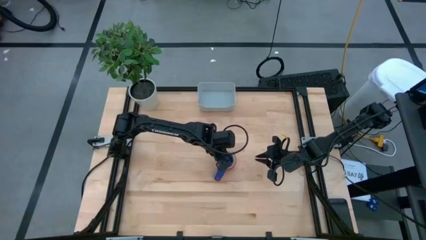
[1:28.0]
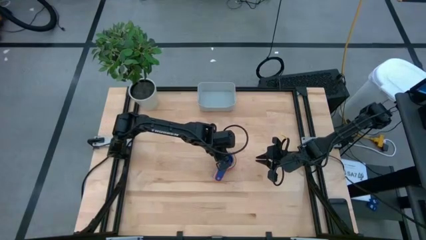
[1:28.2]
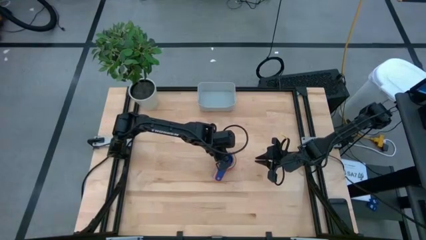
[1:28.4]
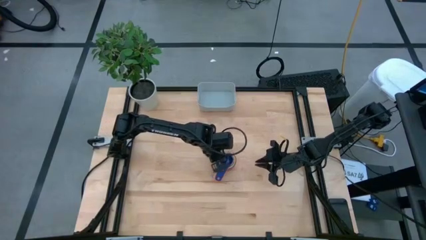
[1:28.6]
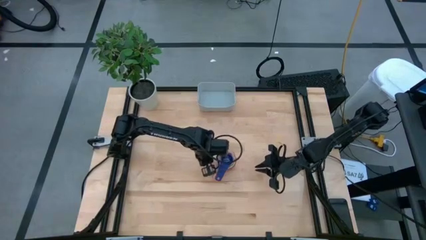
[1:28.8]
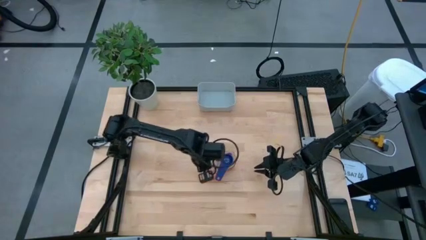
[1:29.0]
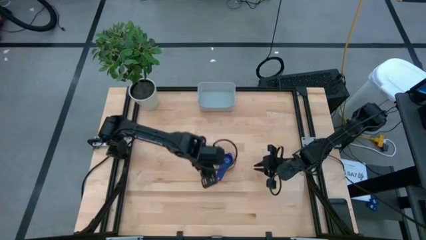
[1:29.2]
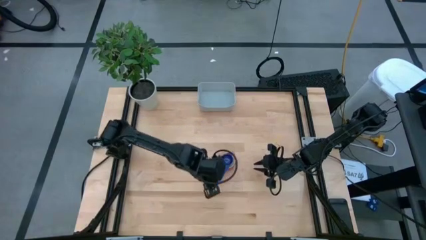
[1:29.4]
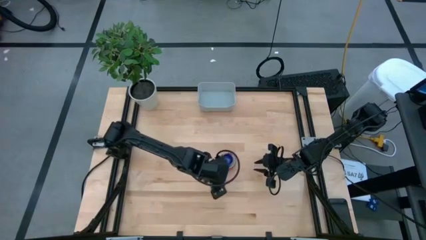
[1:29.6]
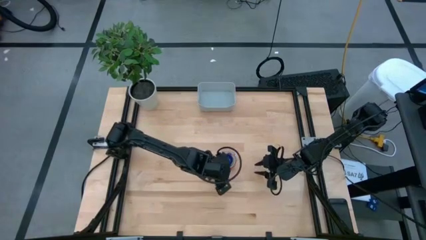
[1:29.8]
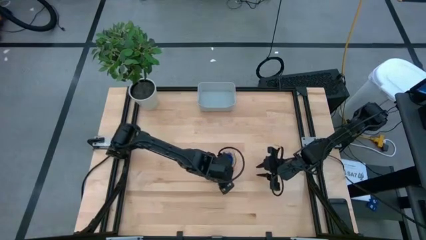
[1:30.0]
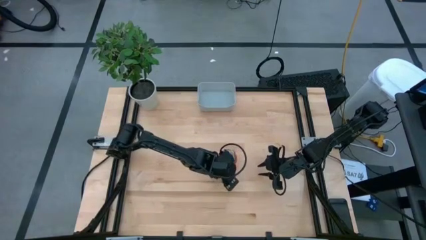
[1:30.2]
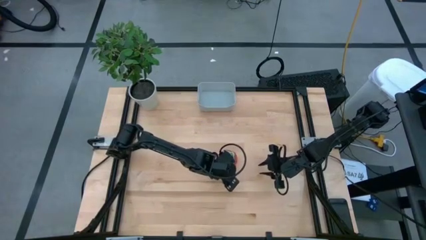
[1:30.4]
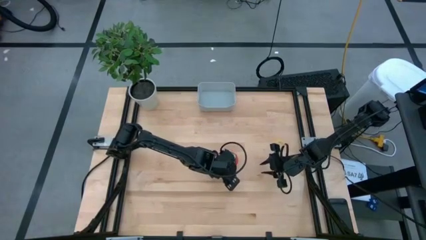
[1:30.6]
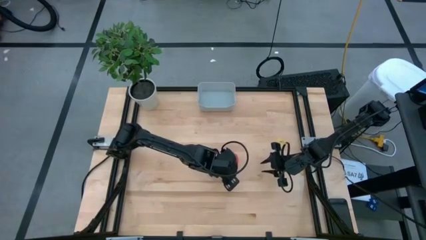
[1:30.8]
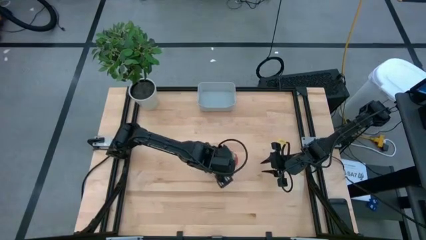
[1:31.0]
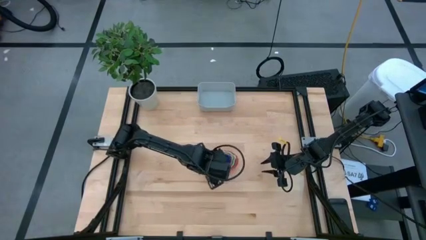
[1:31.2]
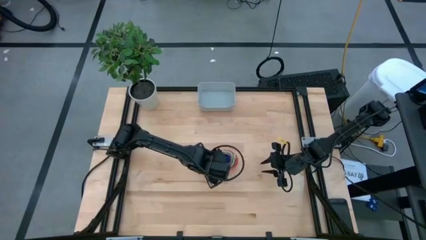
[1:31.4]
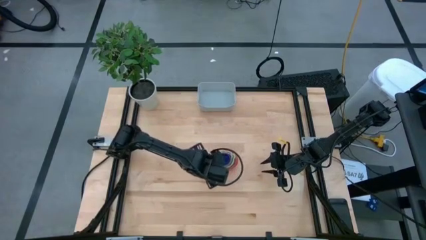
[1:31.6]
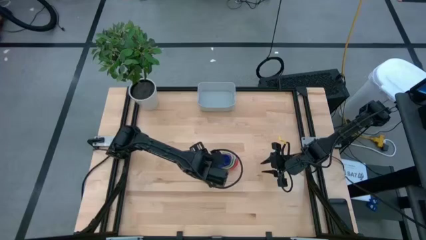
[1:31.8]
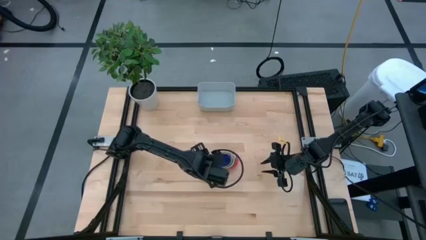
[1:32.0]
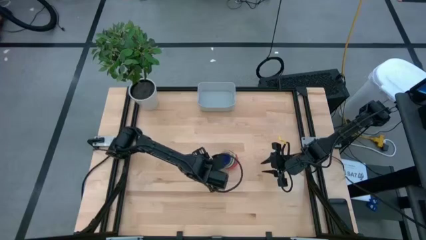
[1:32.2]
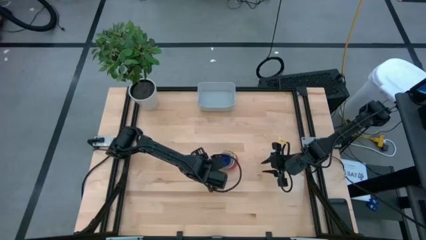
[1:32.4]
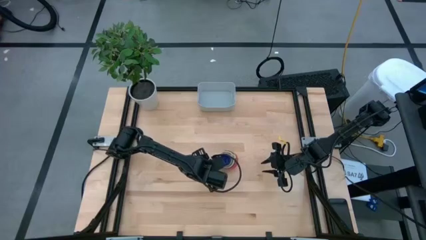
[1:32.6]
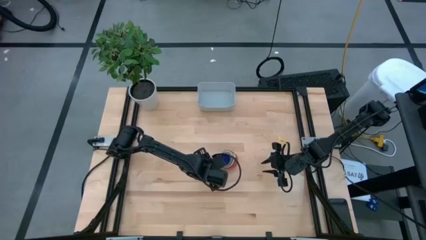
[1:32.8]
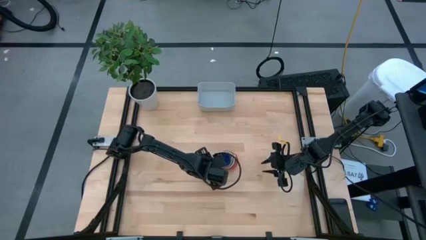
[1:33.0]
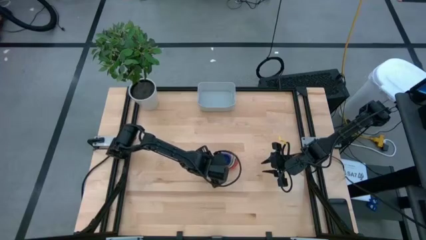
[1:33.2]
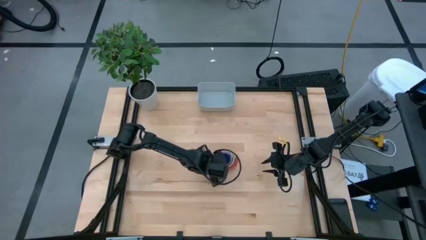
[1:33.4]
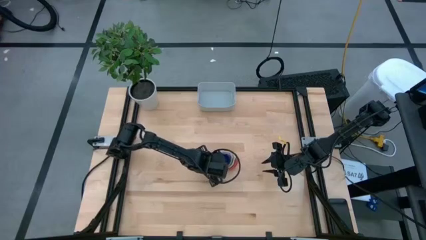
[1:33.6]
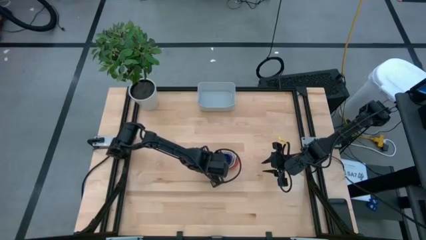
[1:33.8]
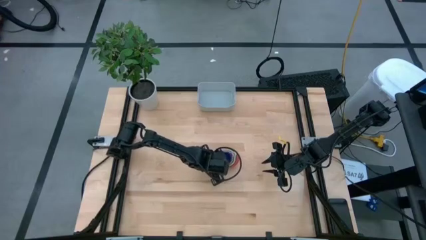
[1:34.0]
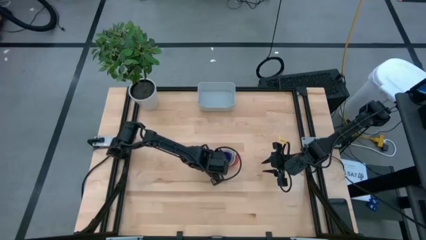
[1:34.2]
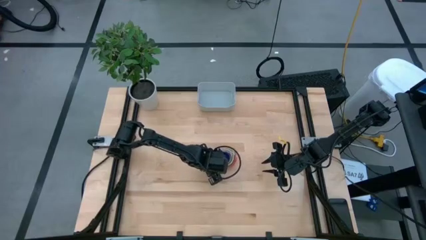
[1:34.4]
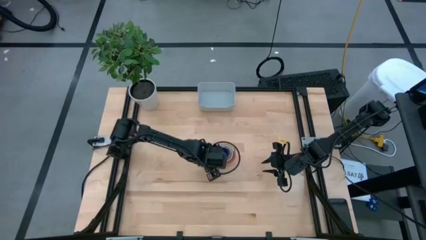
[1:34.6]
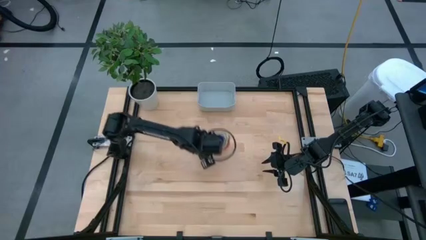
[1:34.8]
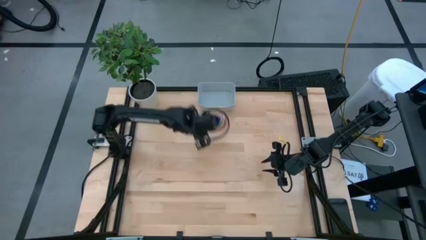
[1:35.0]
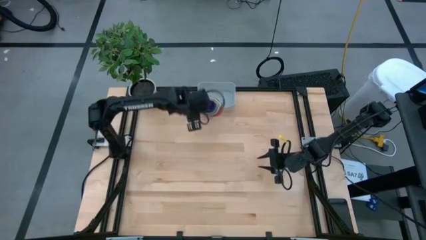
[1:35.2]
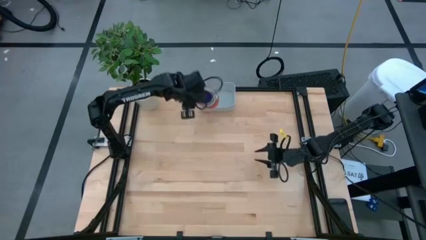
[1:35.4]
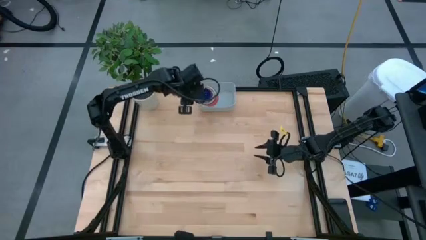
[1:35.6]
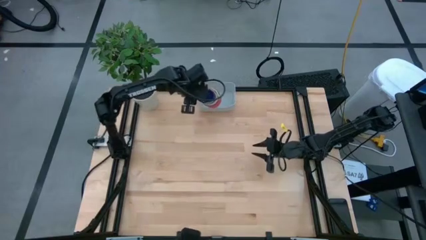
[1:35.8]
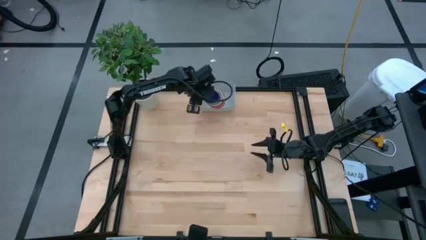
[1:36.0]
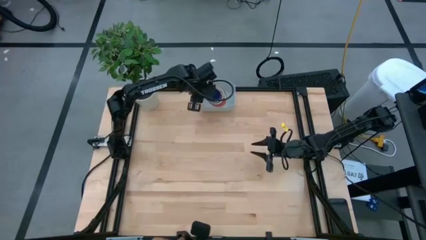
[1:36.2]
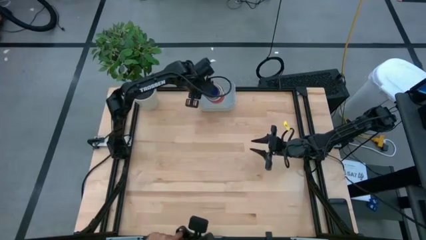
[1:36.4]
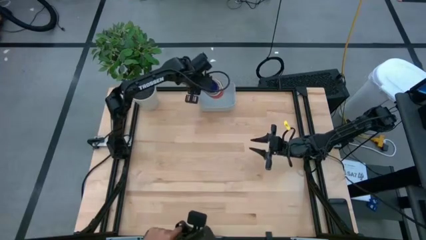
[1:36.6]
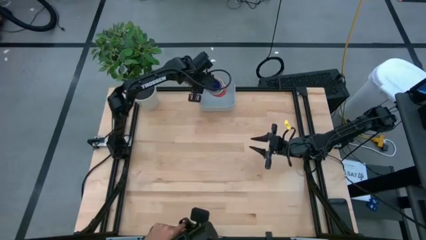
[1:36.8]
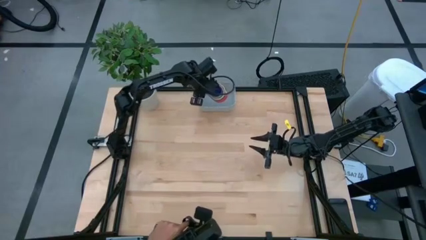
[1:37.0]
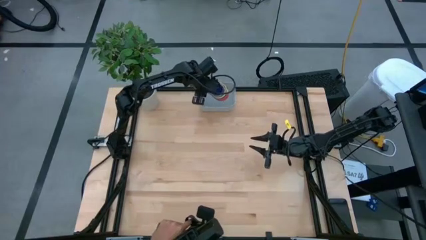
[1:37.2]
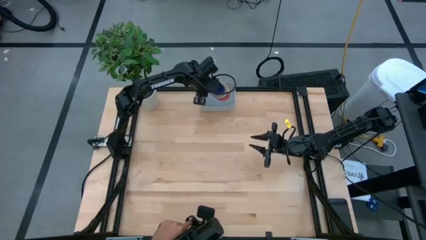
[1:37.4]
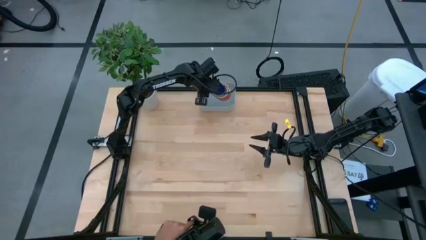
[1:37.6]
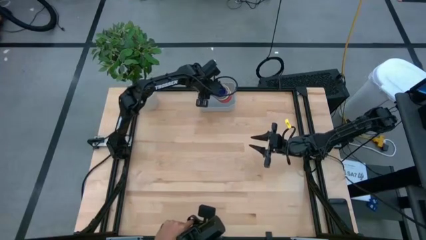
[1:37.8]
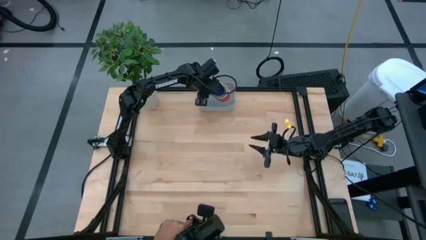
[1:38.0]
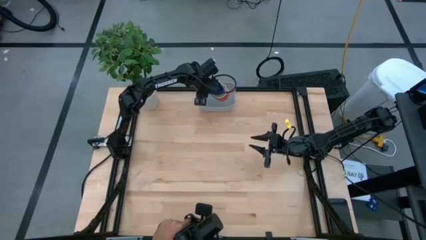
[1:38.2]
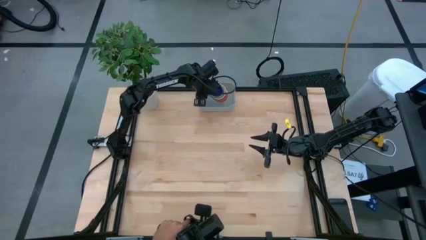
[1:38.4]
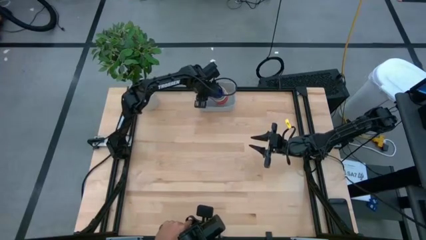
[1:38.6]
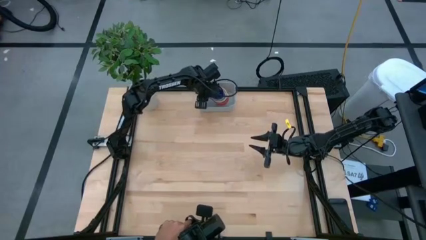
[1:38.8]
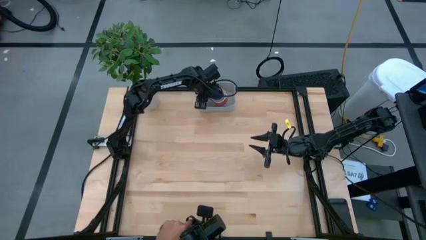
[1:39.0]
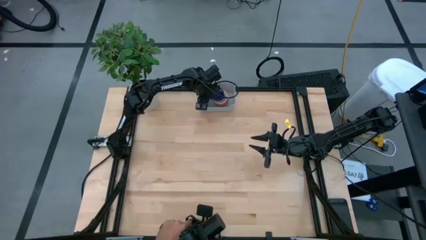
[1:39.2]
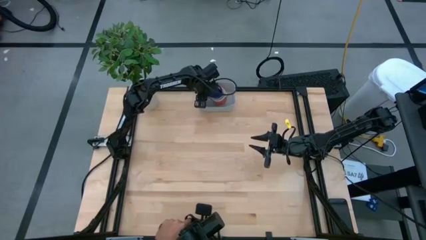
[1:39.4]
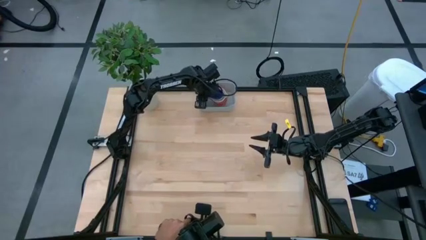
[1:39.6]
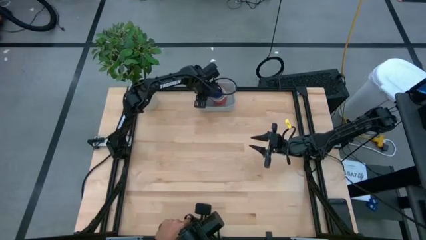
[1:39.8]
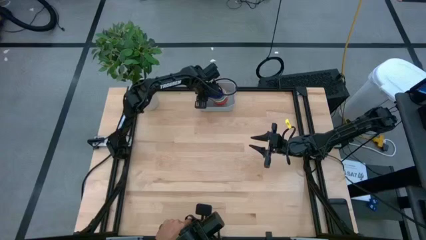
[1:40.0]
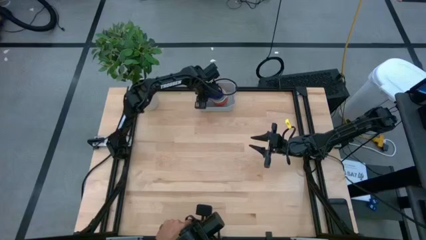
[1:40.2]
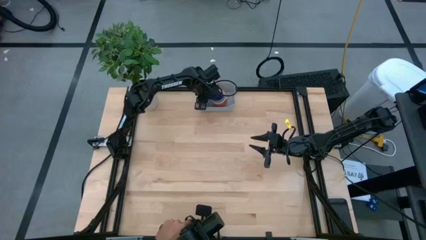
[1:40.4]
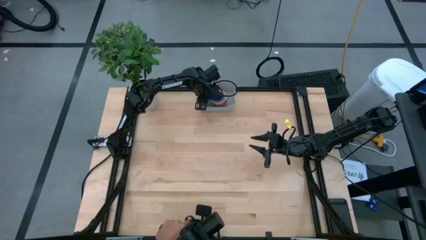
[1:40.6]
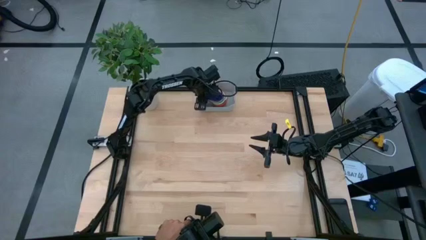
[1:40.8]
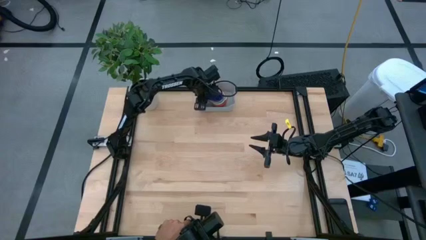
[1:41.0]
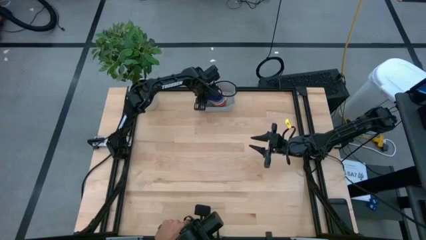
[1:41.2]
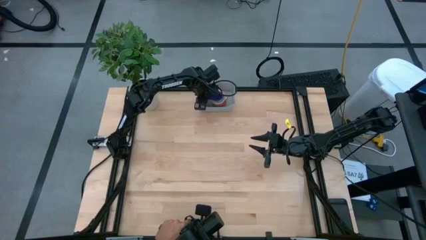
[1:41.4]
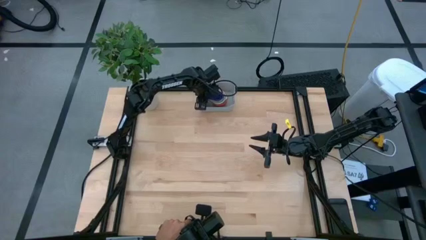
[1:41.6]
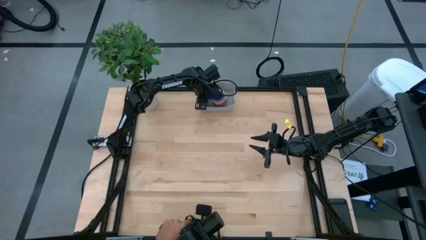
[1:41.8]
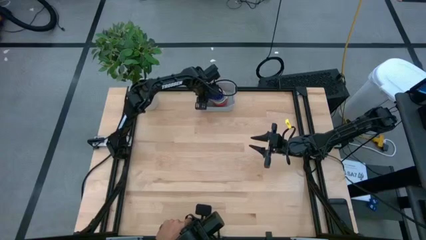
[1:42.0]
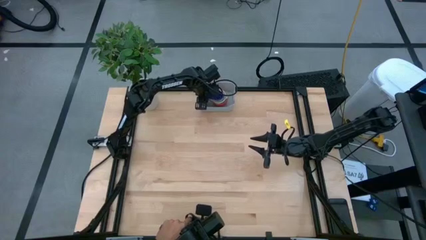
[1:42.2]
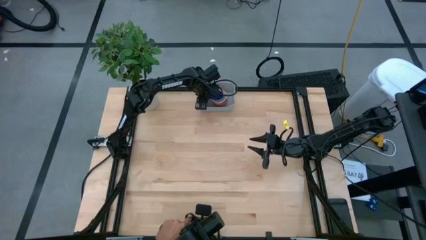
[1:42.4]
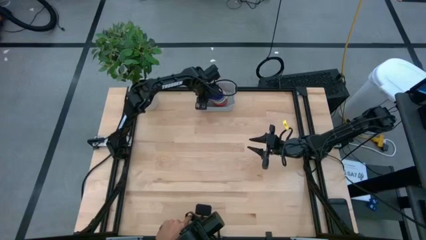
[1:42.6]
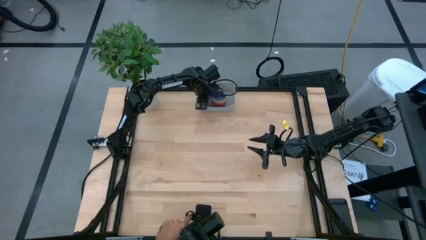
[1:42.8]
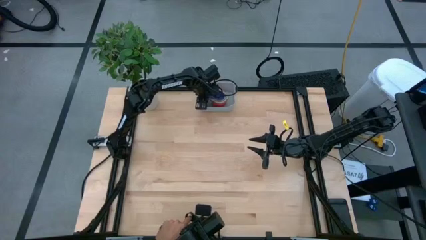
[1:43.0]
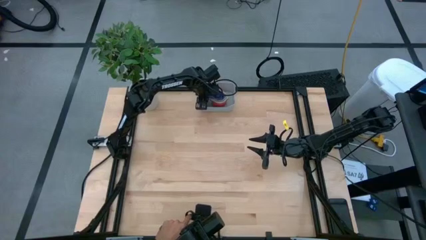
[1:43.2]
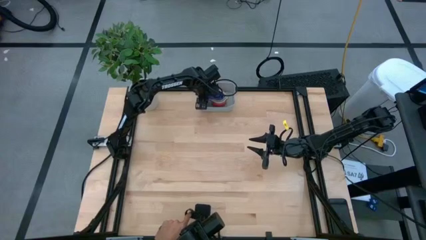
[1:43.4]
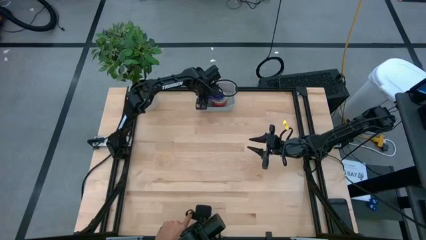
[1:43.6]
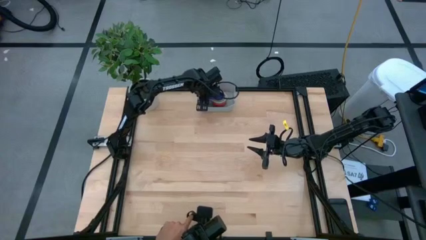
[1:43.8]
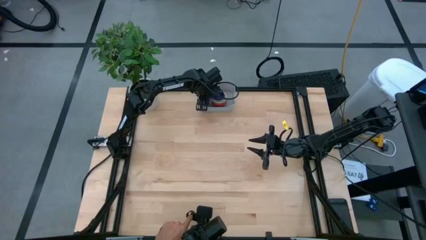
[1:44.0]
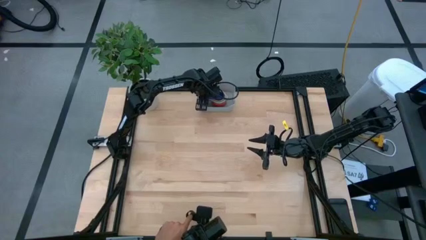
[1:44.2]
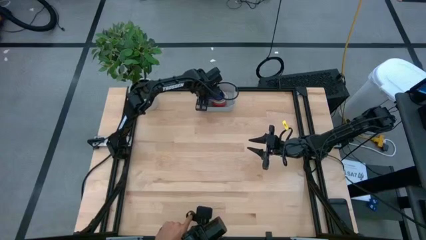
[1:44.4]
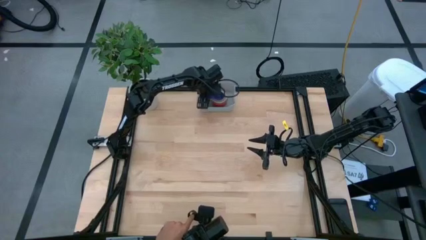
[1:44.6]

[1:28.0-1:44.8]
Task: Nest measuring cups in basket
Put the stacked measuring cups into the white bin
